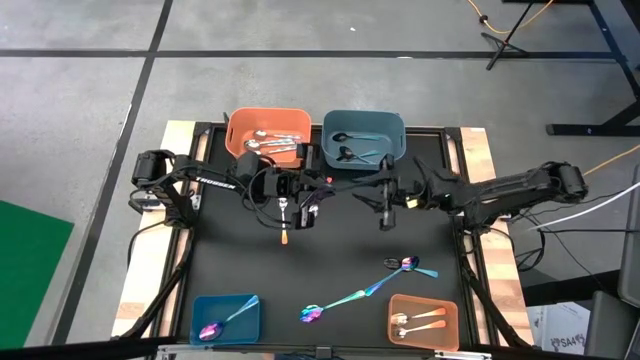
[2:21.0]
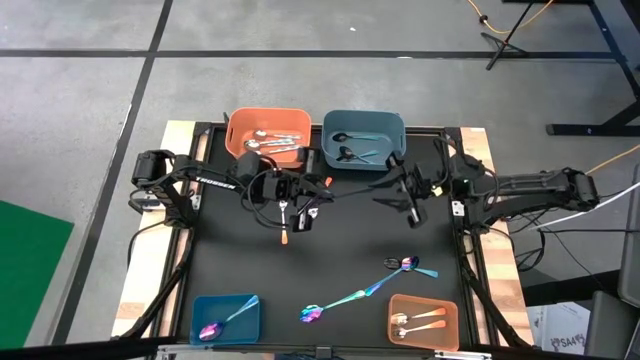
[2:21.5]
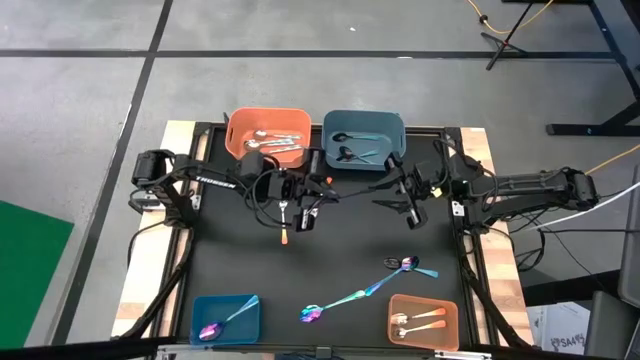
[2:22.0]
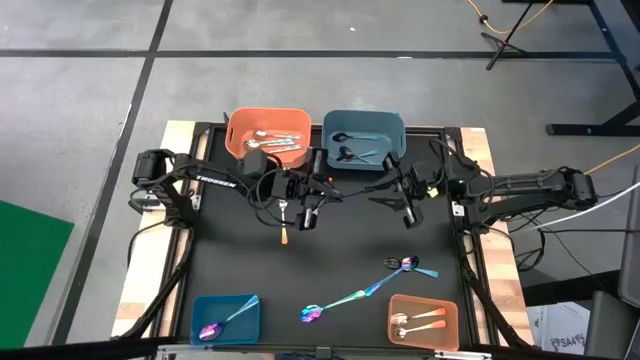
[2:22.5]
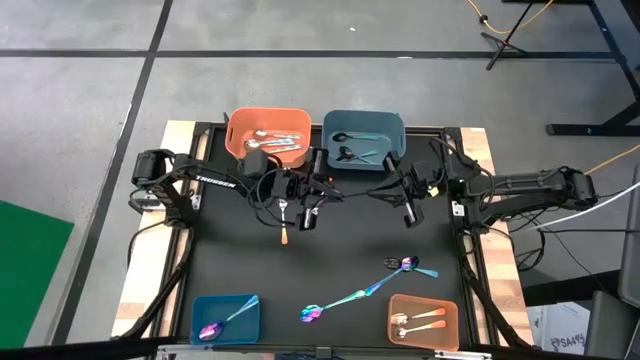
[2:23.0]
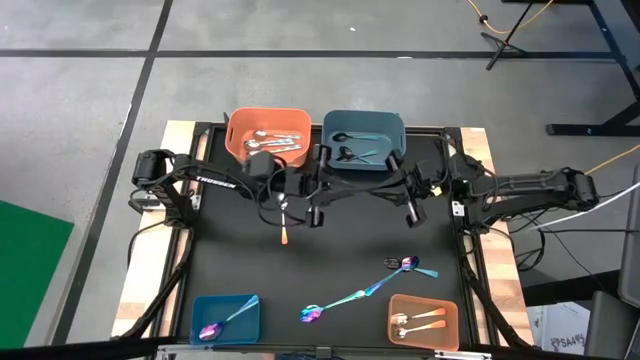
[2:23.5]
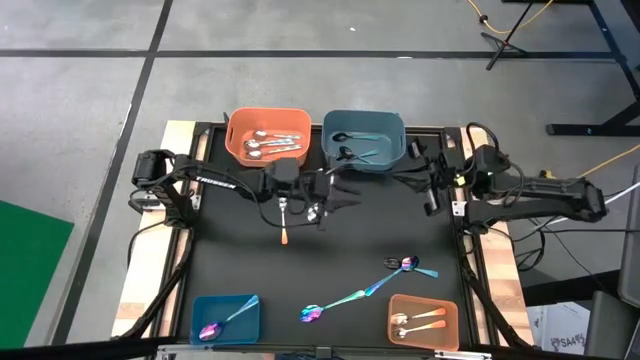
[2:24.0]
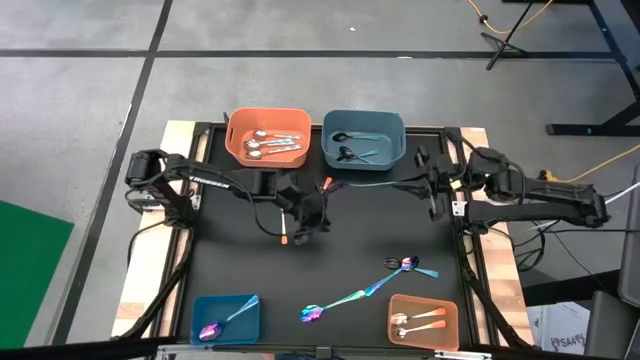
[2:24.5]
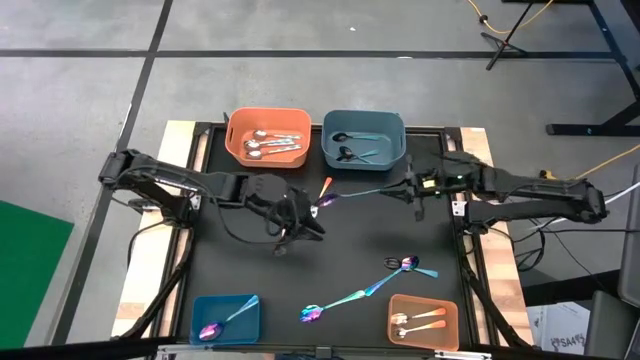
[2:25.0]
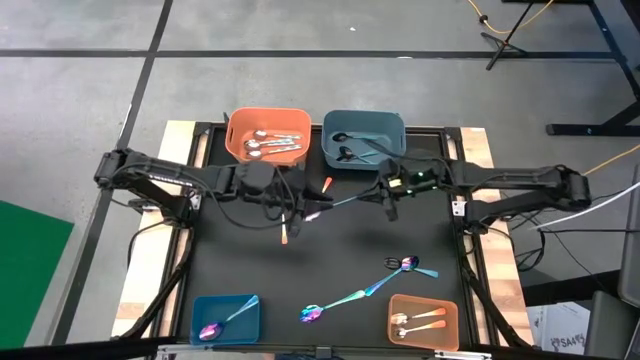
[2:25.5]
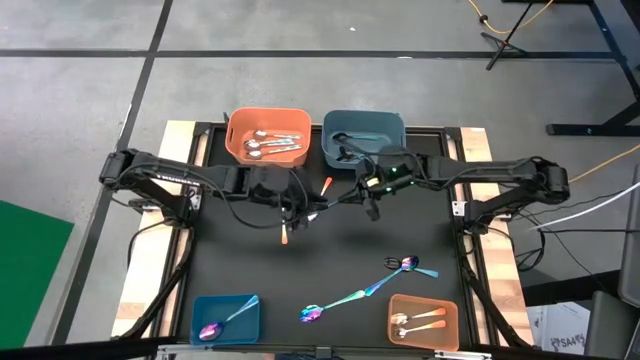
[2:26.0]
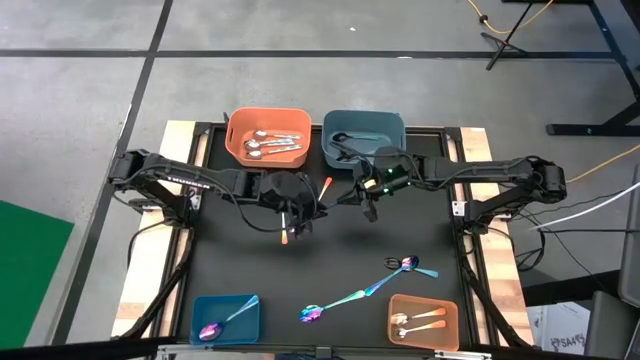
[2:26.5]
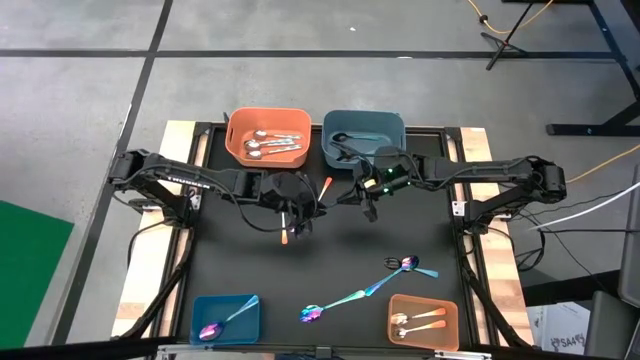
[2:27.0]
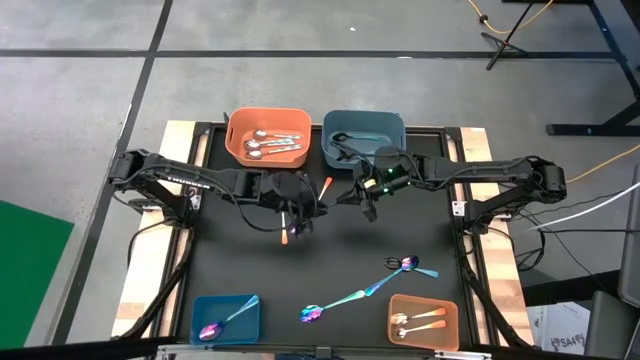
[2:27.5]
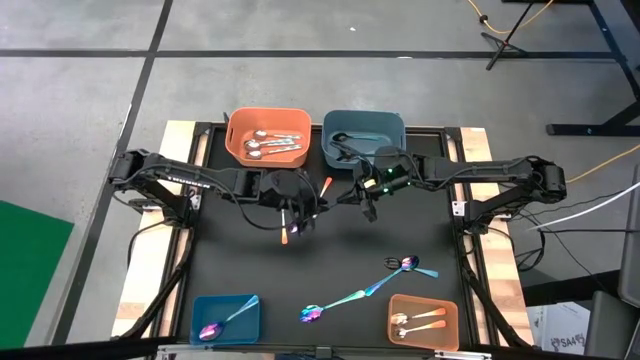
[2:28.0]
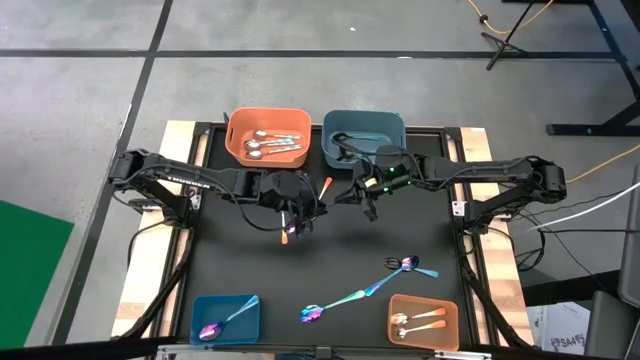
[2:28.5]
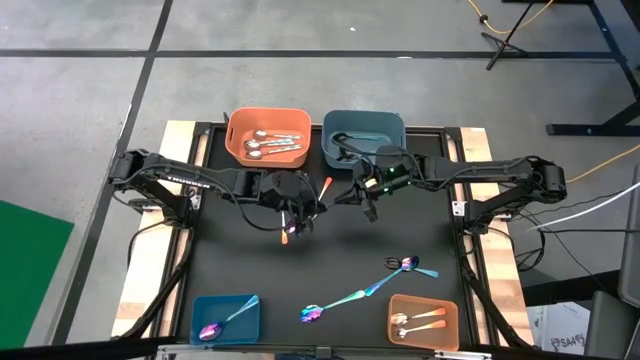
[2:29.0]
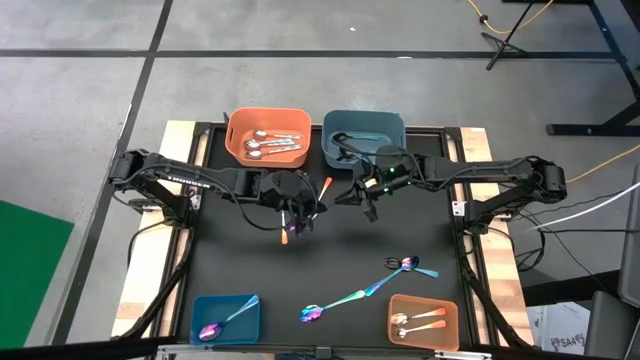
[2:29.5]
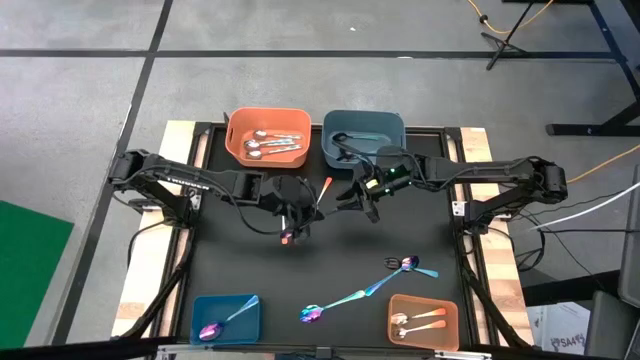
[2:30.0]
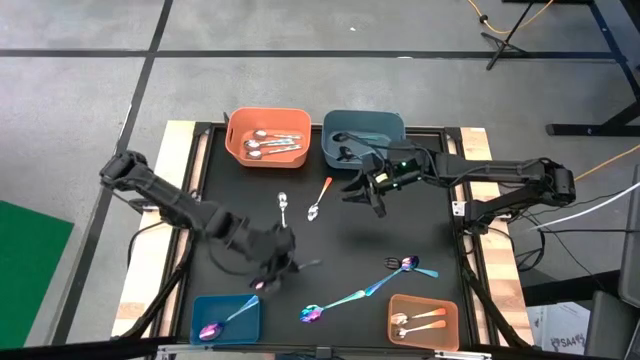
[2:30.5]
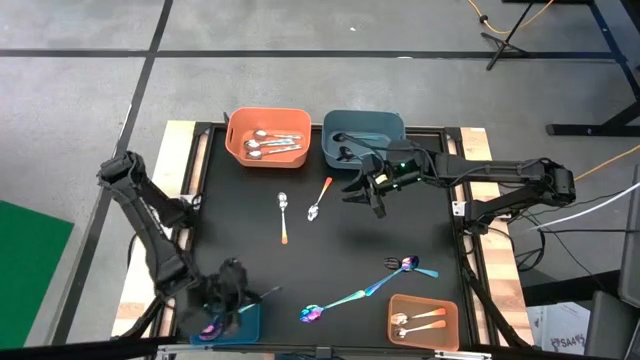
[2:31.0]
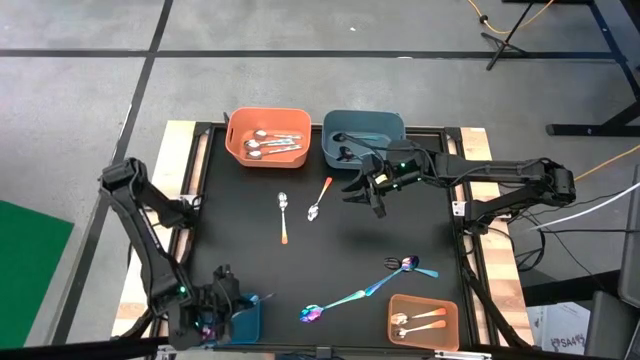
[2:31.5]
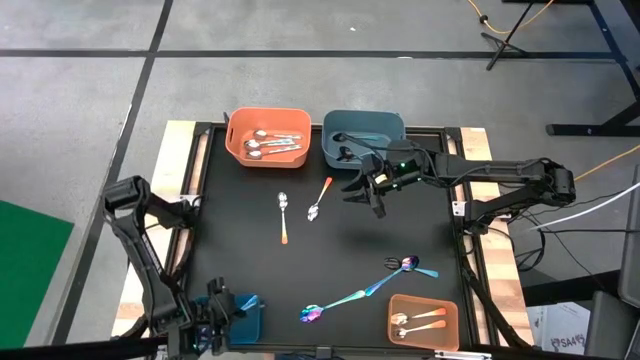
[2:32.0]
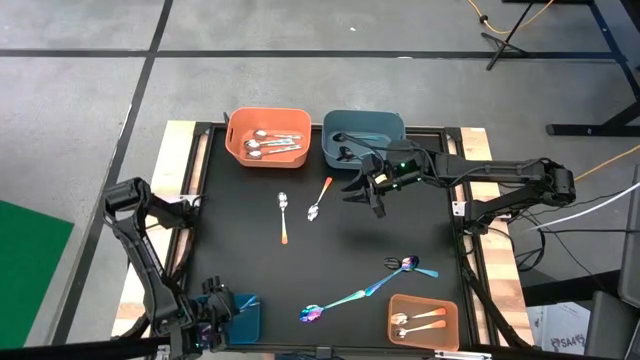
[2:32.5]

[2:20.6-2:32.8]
Task: Sort silverware by color (type)
Put the purple spoon into the bottom blue bin

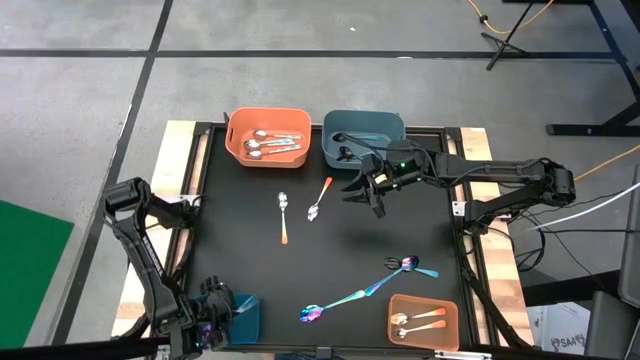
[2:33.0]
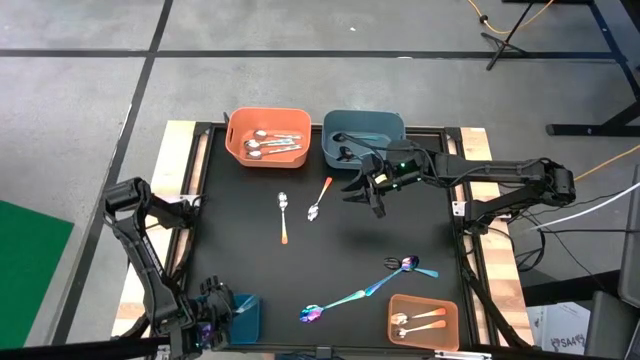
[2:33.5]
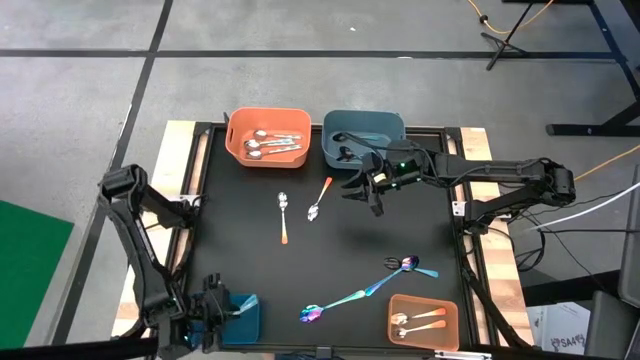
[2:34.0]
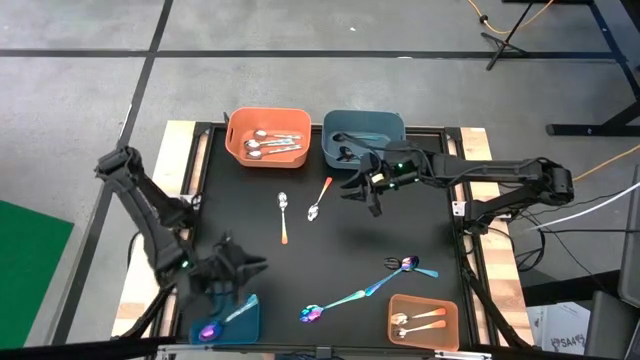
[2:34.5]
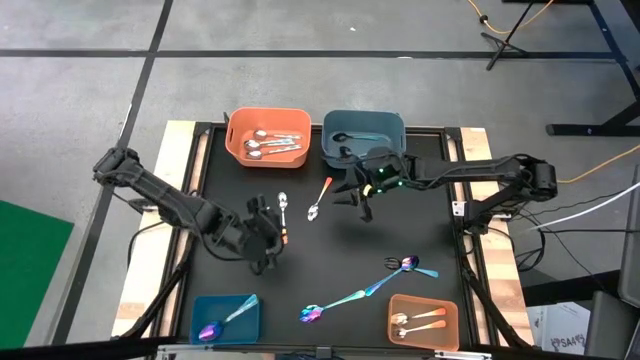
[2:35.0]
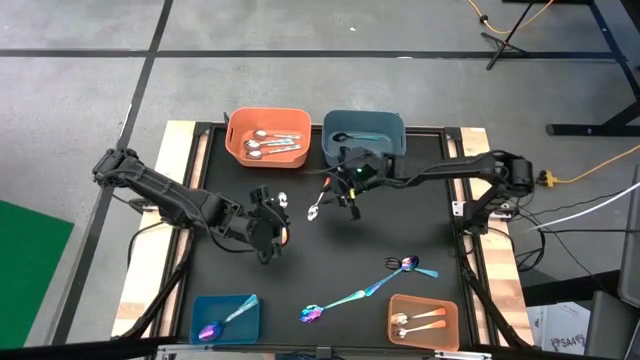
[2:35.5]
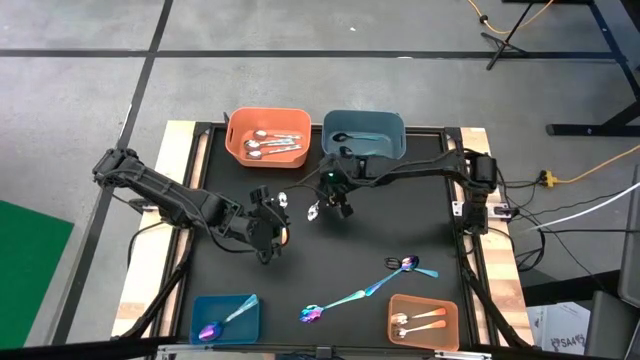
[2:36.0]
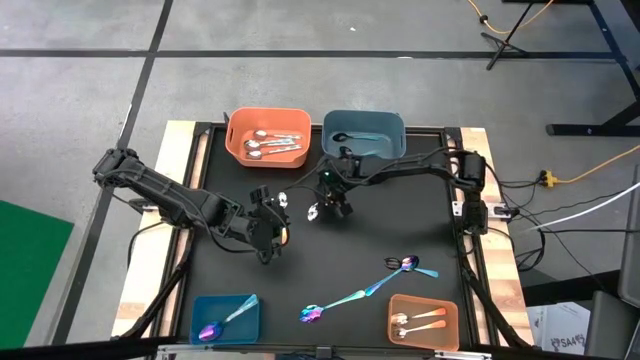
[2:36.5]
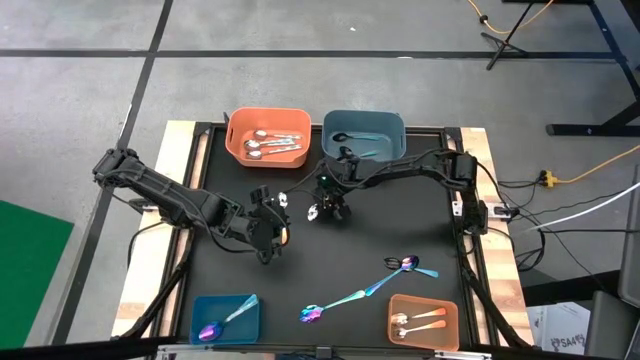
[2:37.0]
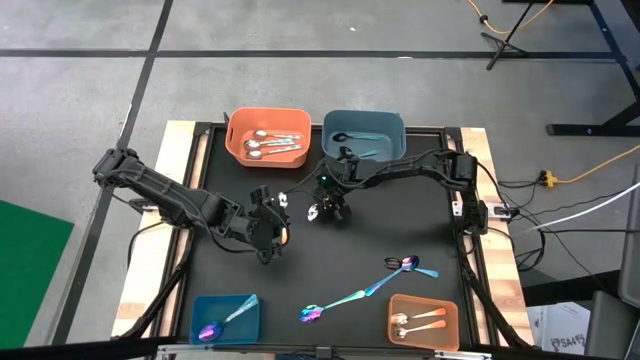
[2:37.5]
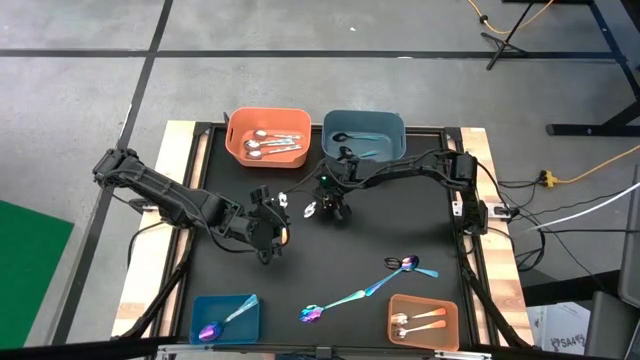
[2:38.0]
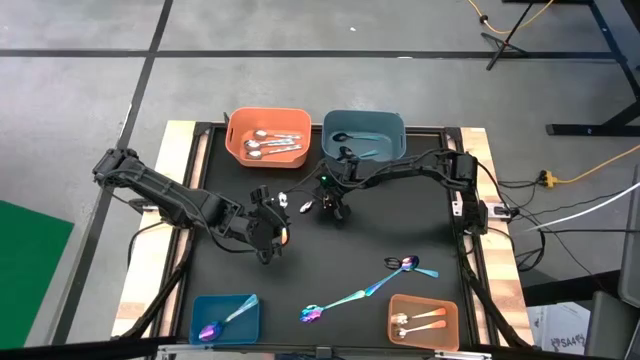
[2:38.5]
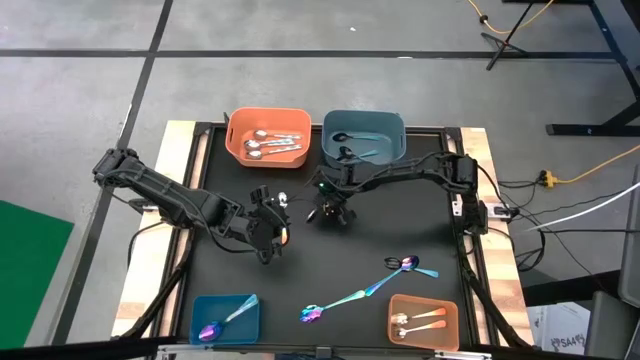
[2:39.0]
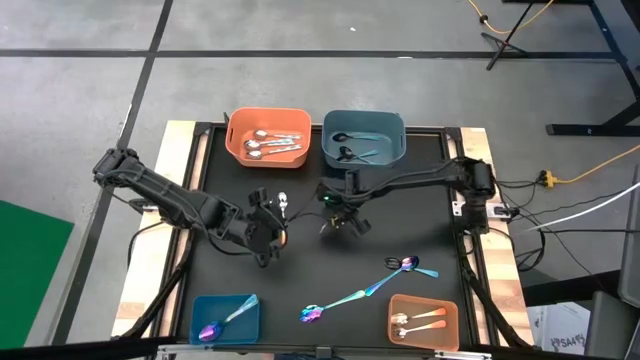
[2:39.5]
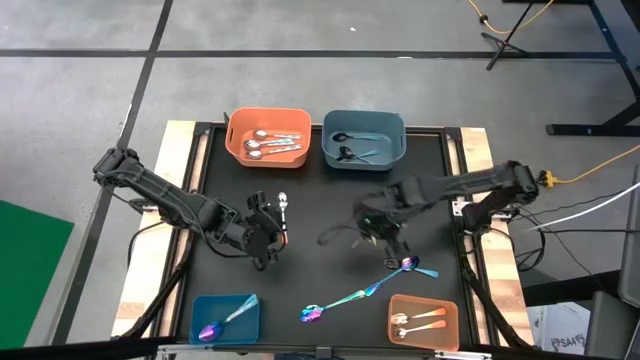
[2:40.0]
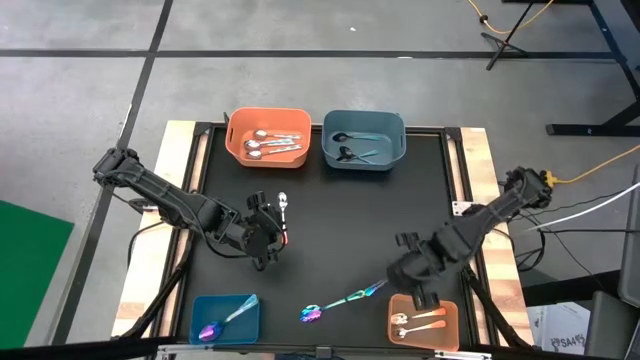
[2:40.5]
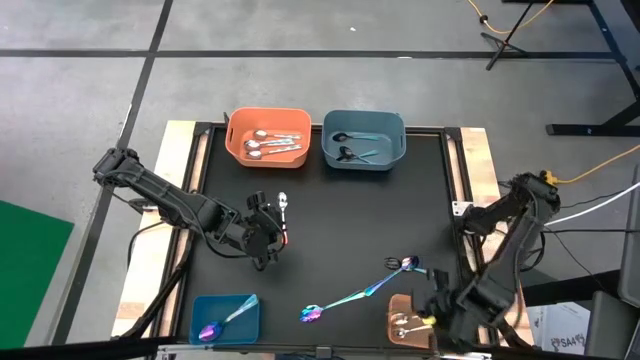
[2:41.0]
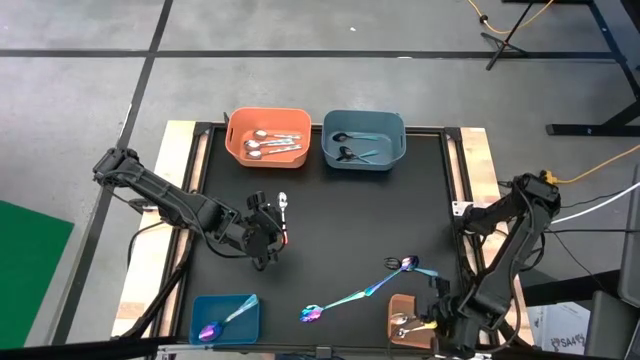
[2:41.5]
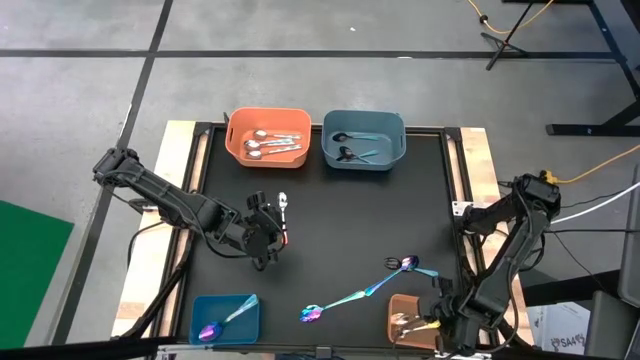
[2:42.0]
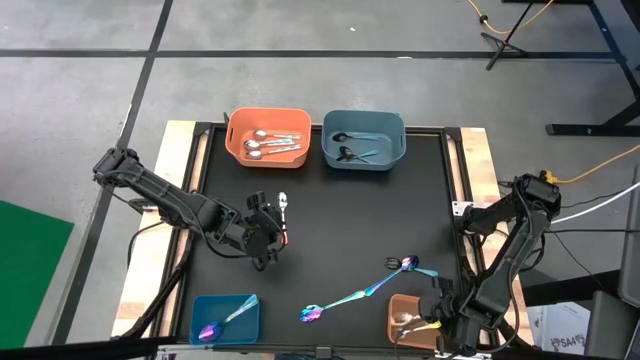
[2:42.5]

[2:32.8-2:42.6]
Put the orange spoon into the bottom orange bin

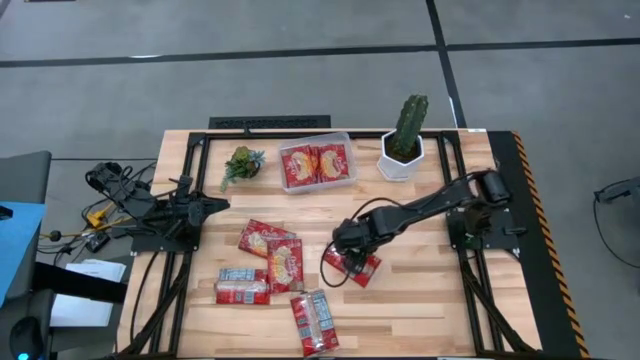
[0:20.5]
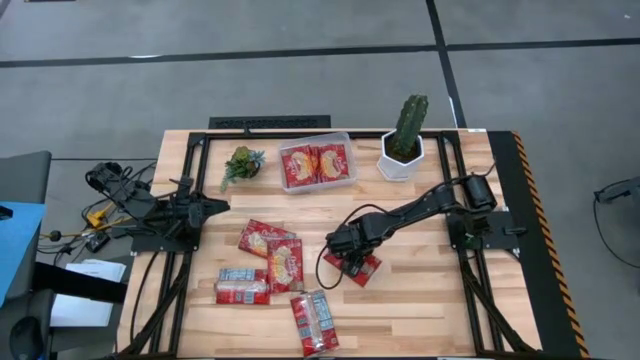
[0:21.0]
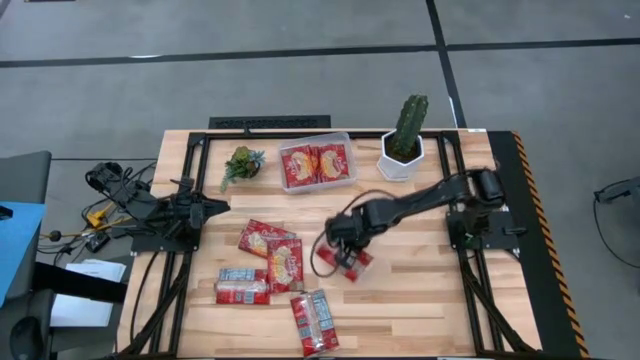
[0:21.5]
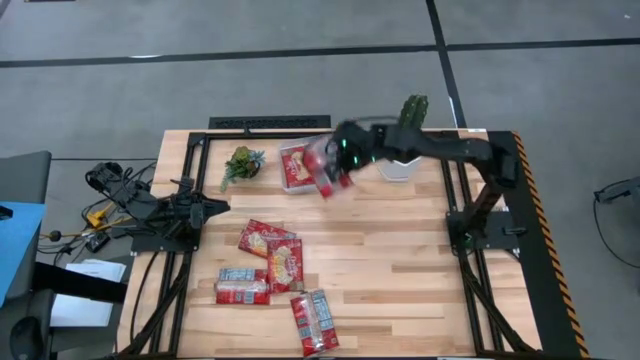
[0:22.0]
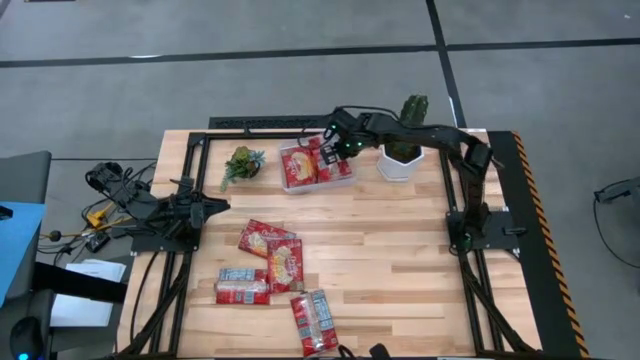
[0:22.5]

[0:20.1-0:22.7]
Task: Sort popcorn bags into baskets
Put the red popcorn bag into the transparent bin
